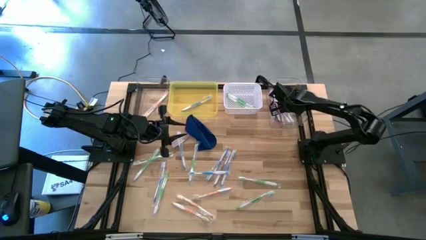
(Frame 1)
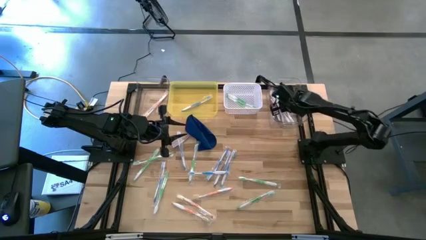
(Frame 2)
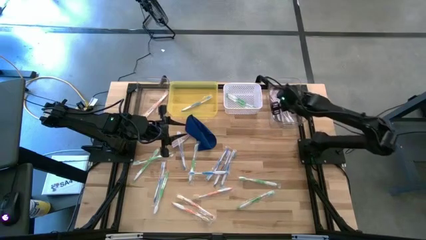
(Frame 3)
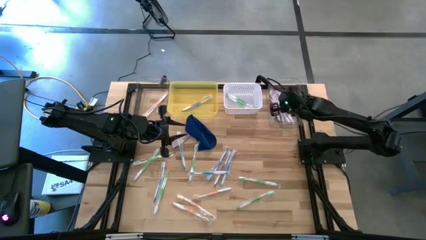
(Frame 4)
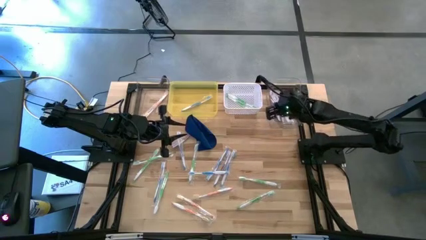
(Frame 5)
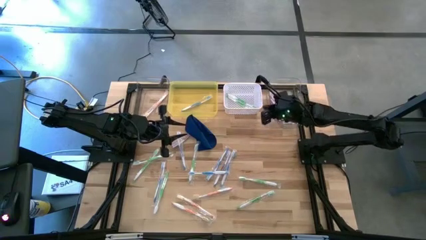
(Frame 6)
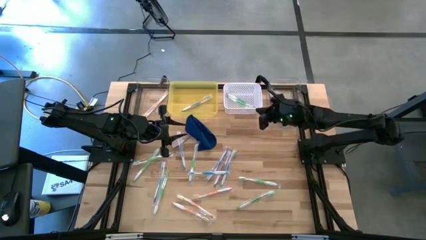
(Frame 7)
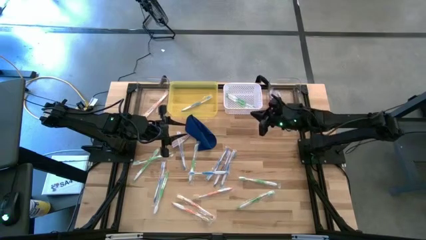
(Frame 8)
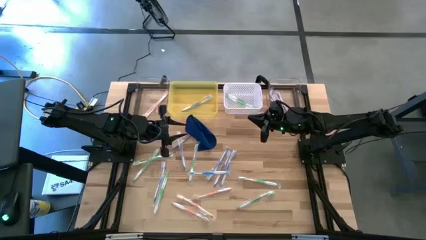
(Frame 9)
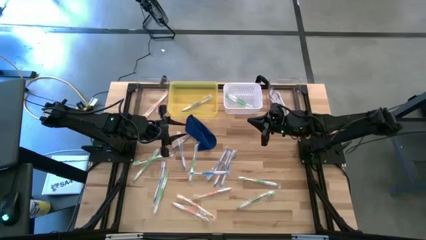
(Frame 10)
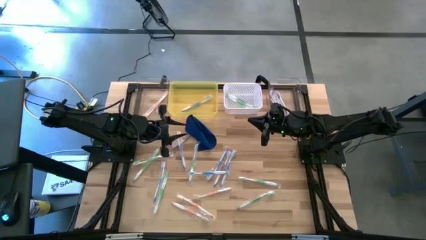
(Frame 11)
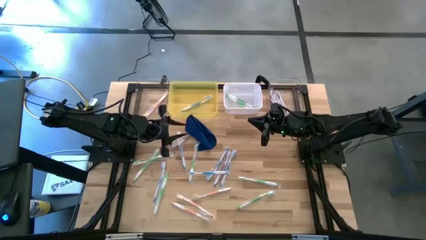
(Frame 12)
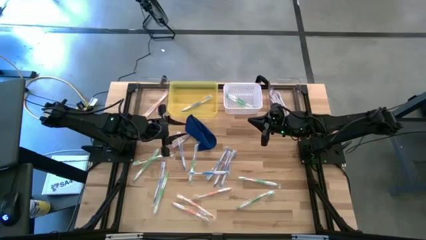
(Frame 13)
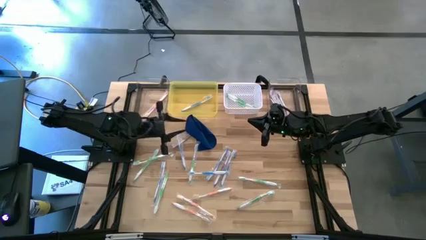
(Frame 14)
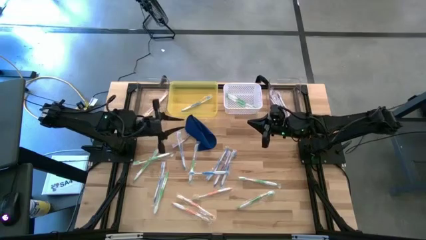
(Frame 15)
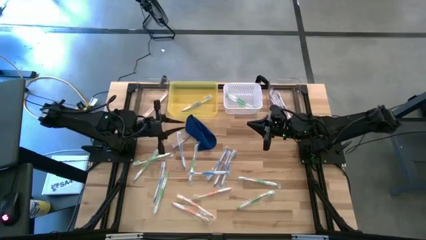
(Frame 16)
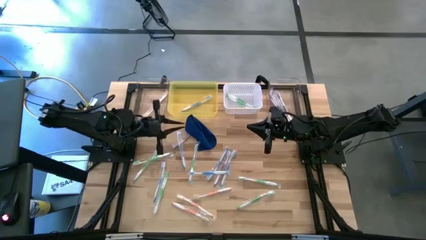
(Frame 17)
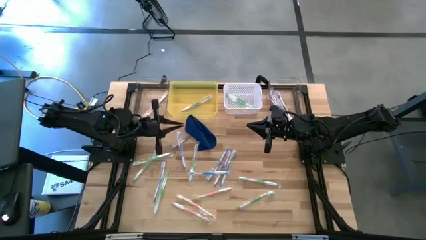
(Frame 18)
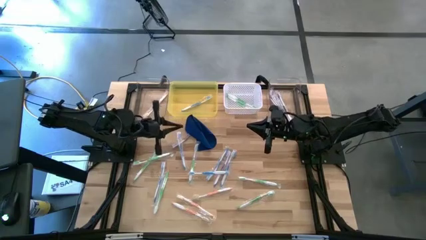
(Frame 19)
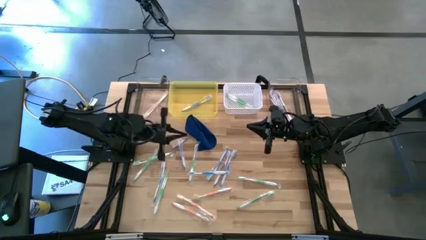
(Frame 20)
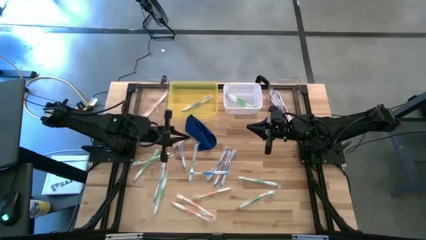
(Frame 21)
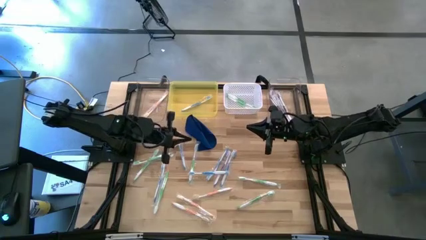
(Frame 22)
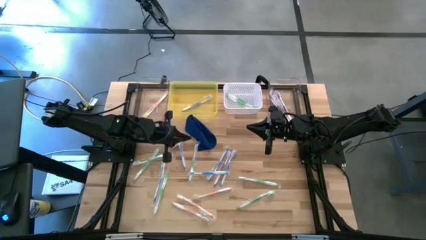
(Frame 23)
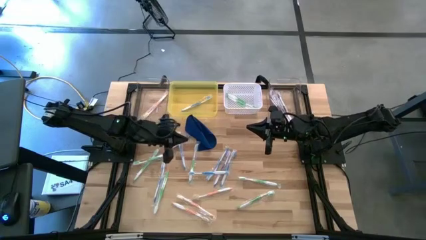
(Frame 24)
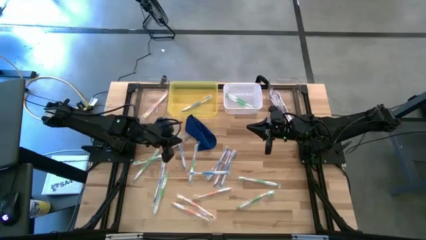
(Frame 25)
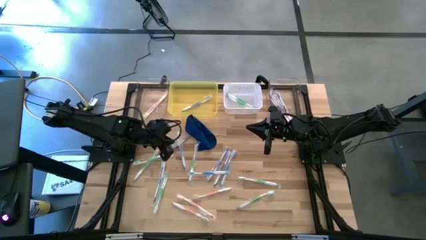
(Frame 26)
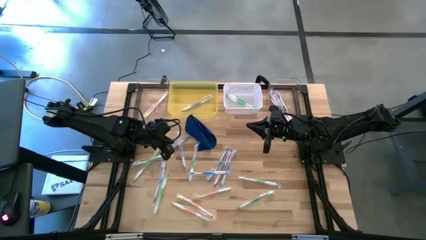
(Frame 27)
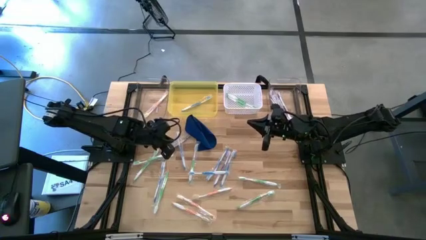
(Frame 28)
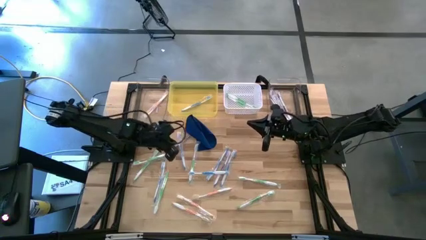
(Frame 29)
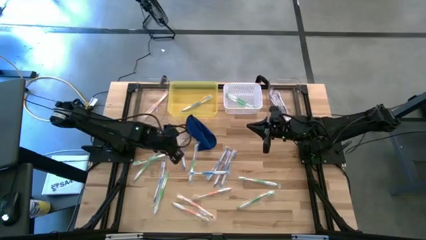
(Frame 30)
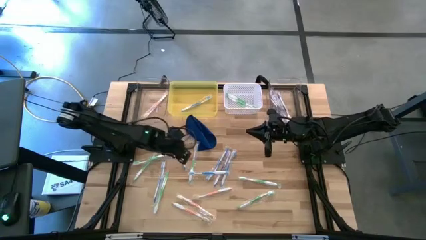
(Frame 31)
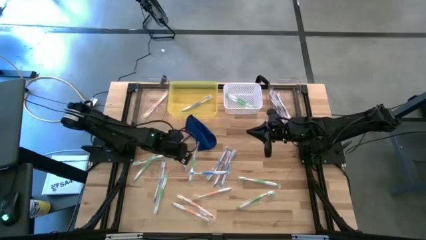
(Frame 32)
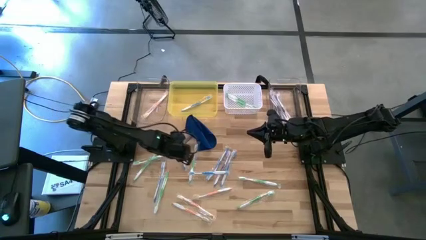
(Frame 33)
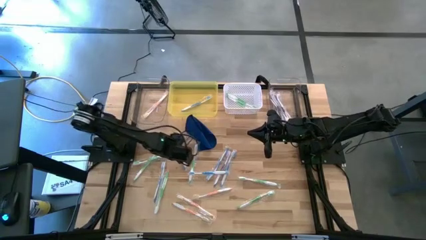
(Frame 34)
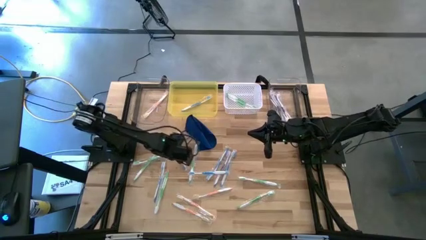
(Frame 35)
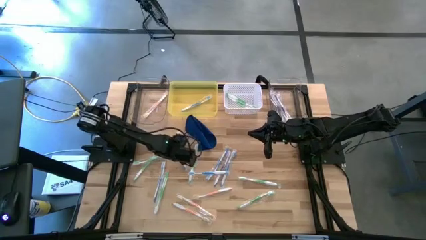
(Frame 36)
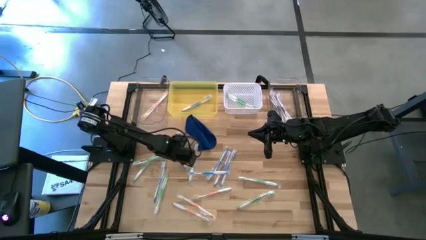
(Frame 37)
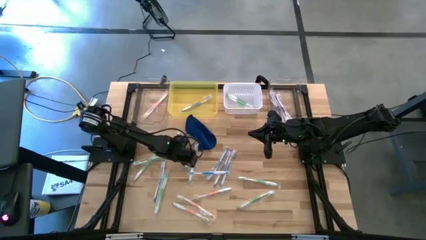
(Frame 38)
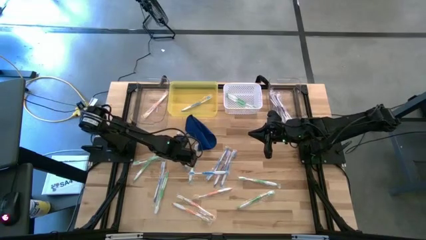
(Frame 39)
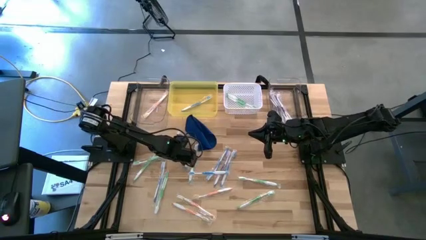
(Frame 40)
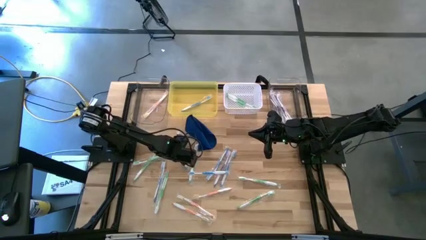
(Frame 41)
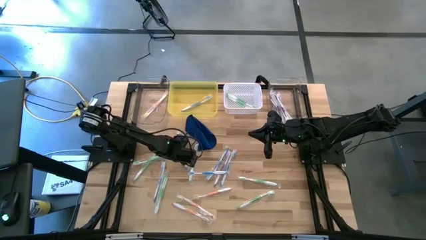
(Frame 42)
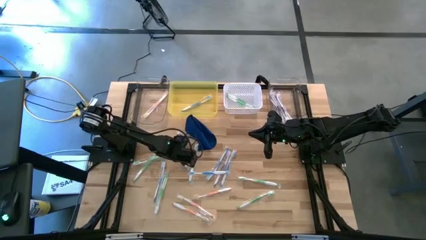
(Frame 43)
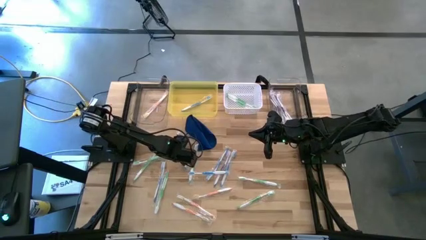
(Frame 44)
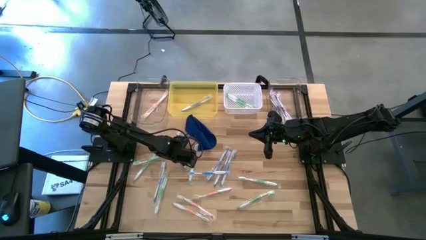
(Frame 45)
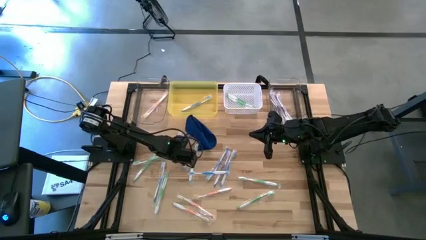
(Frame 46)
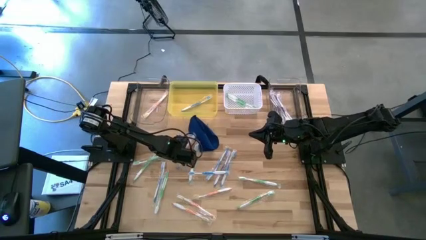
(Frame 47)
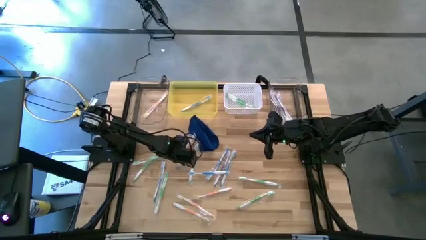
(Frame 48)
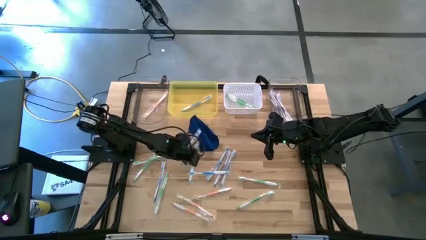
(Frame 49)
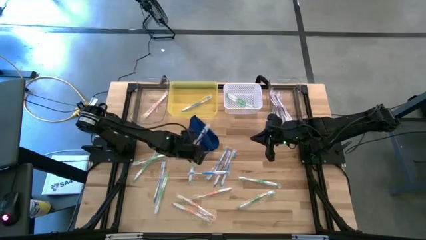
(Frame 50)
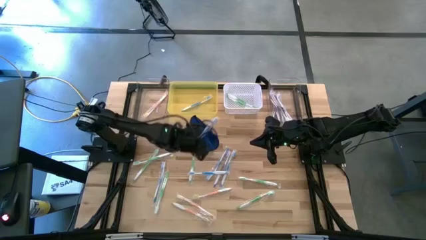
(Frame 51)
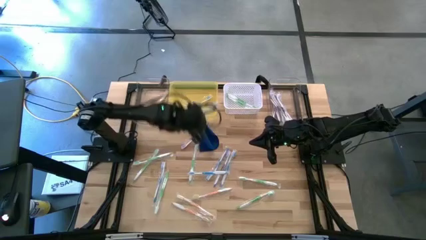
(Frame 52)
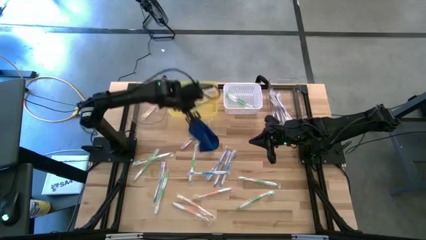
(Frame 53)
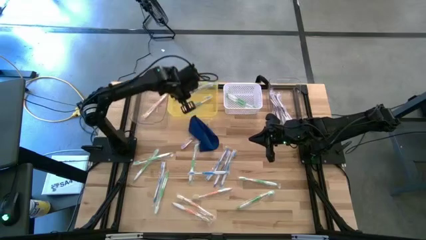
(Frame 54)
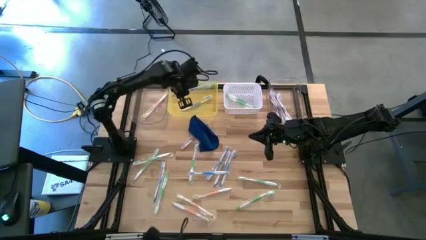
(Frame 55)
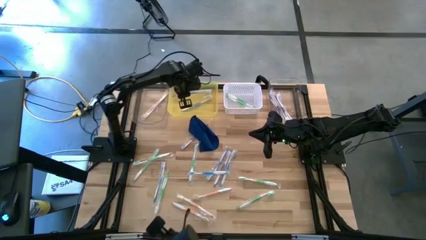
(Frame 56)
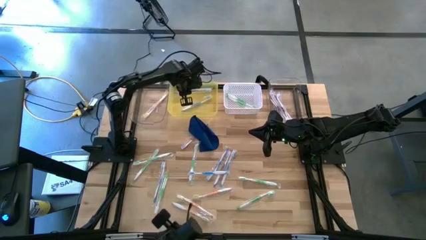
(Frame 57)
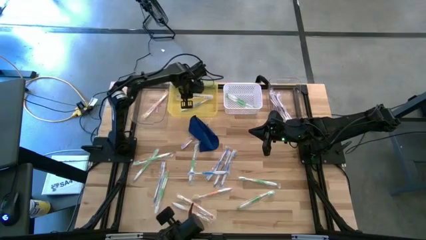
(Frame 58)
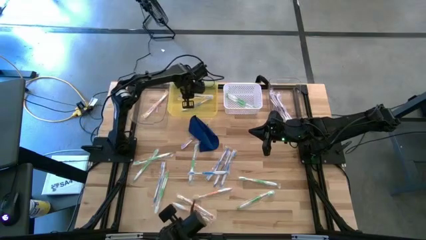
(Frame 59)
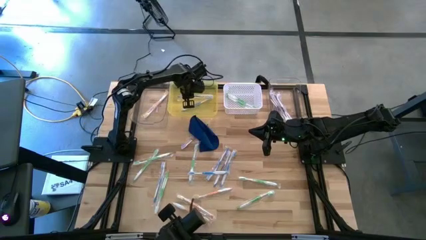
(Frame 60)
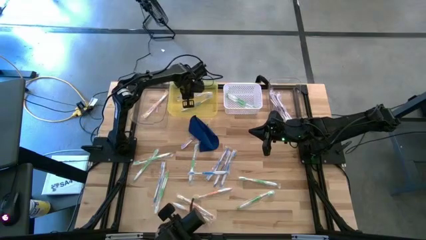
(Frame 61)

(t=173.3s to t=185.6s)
Task: Pick & Place Toothbrushes
Put the blue toothbrush into the yellow bin

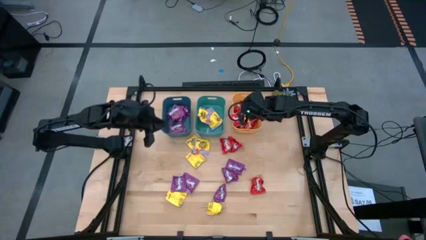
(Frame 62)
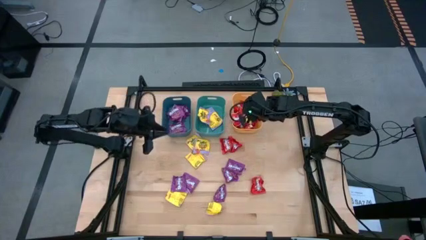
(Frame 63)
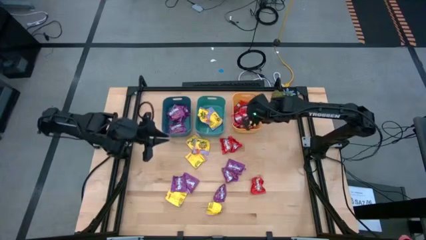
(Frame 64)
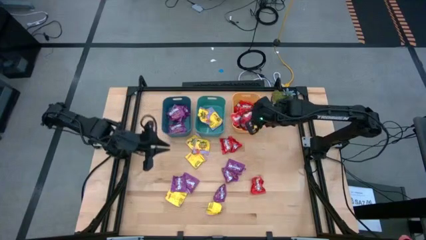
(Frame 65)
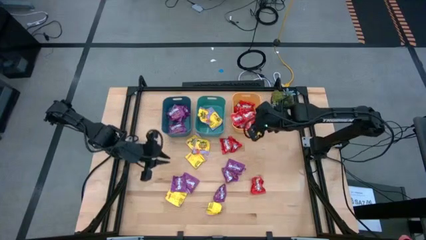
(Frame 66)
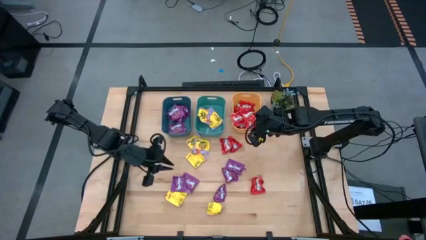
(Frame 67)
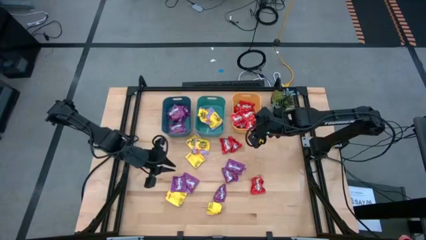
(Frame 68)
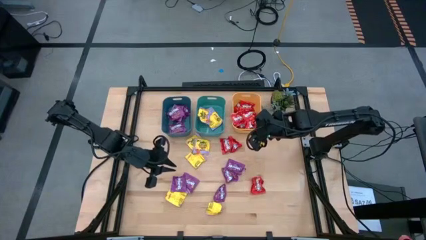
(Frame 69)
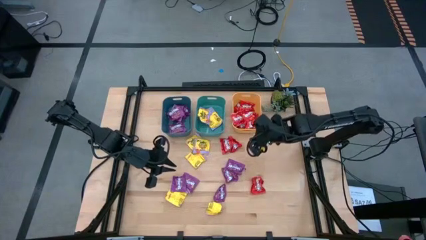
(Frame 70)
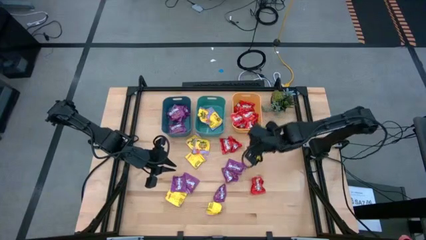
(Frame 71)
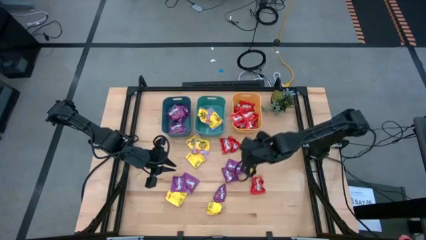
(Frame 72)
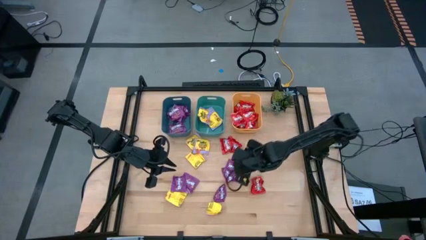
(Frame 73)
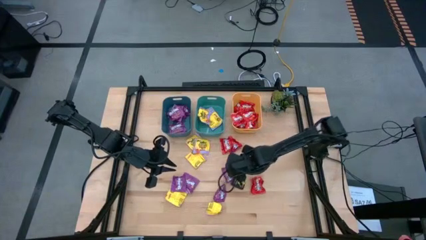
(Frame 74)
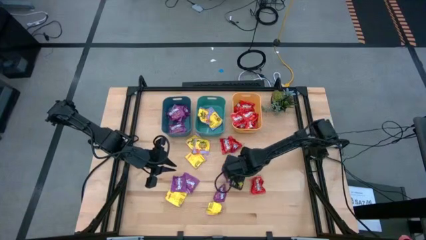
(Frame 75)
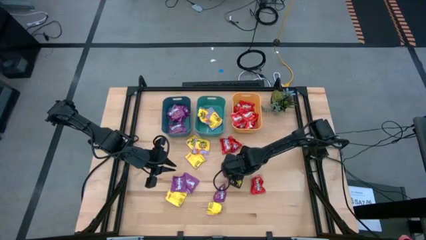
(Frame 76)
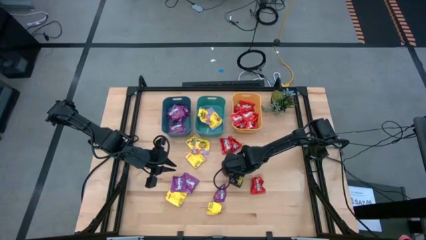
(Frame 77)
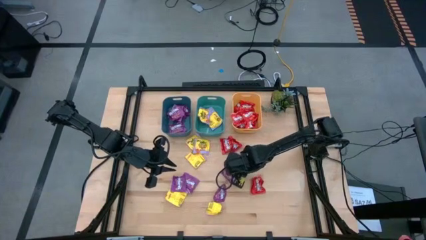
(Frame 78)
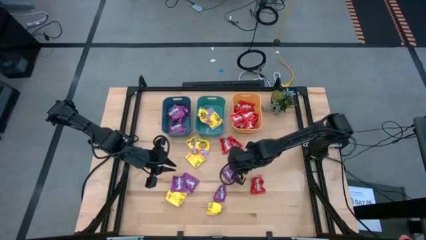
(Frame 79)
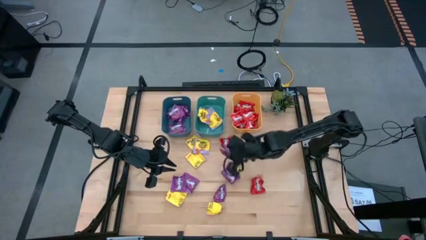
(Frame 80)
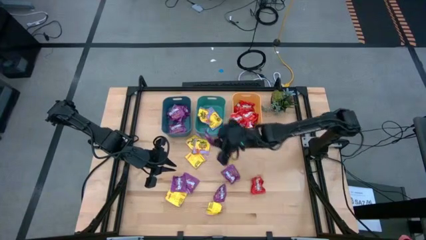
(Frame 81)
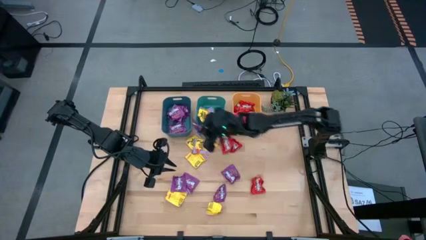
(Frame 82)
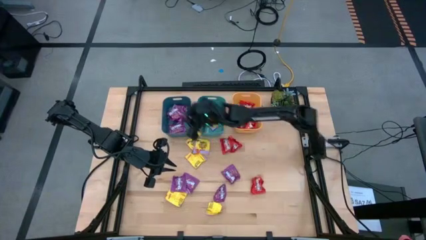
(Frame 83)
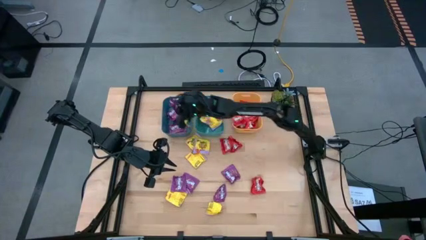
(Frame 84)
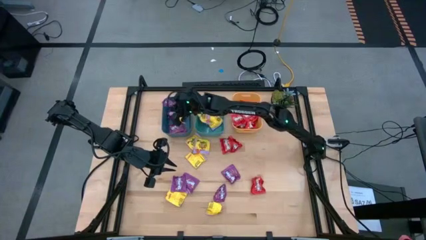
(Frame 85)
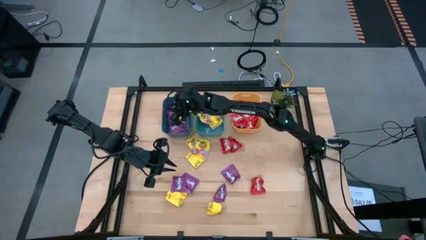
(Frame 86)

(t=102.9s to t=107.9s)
Task: Sort candy
Put the violet candy into the blue bin
